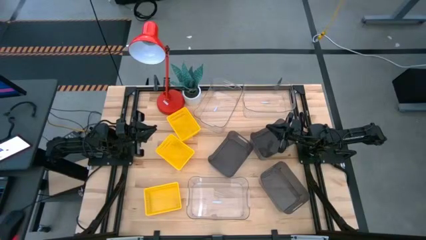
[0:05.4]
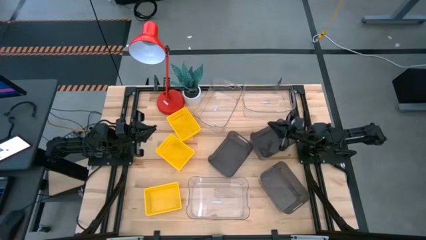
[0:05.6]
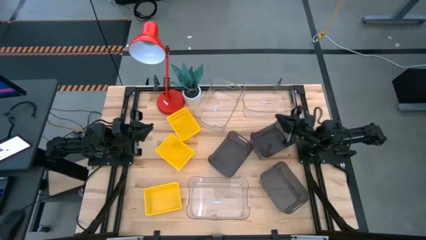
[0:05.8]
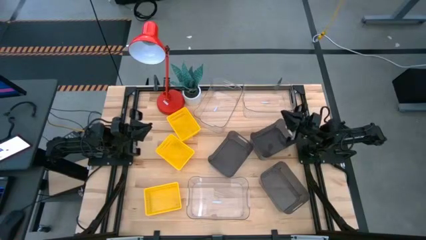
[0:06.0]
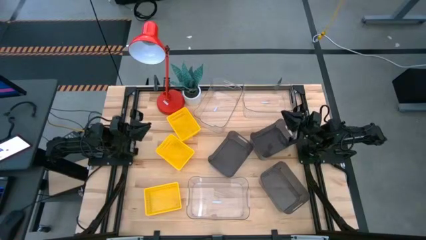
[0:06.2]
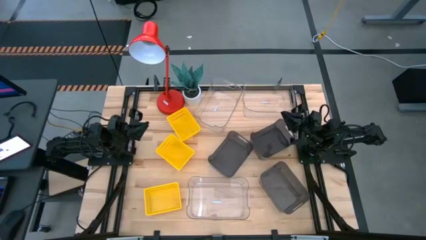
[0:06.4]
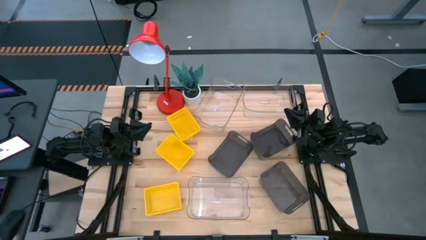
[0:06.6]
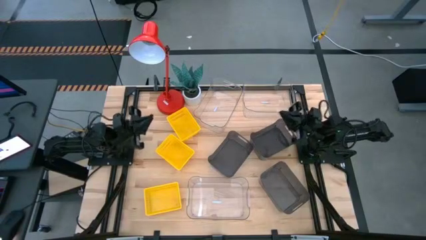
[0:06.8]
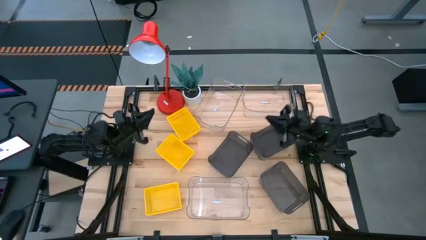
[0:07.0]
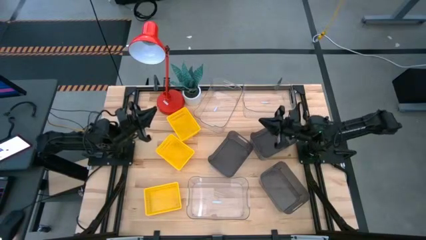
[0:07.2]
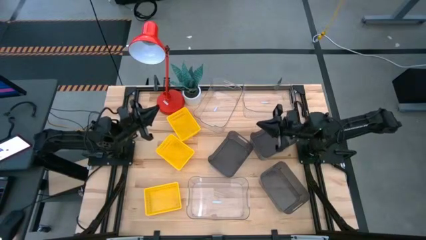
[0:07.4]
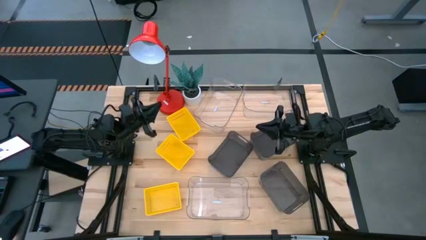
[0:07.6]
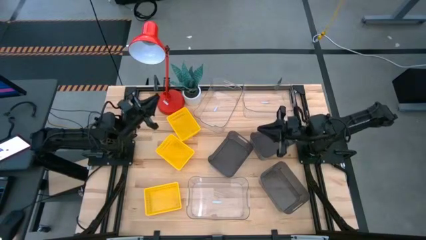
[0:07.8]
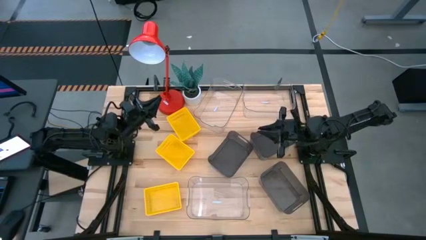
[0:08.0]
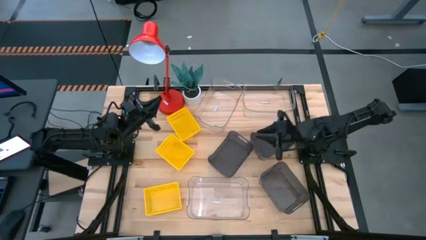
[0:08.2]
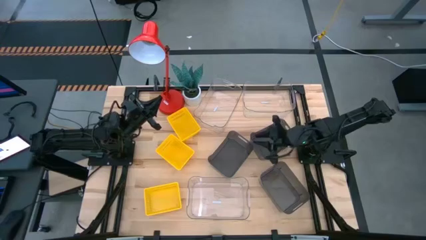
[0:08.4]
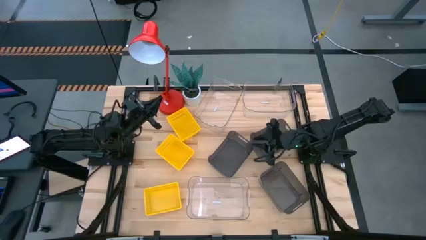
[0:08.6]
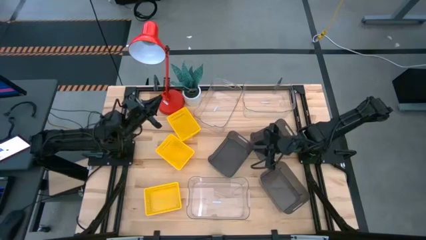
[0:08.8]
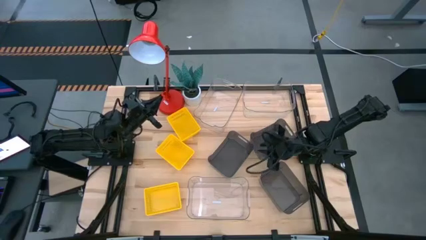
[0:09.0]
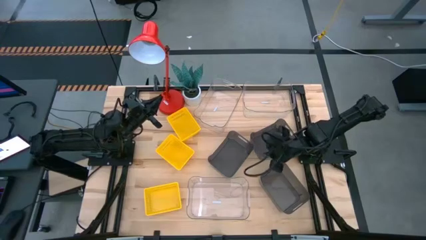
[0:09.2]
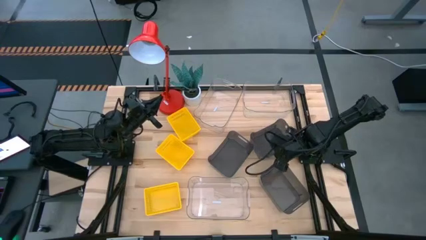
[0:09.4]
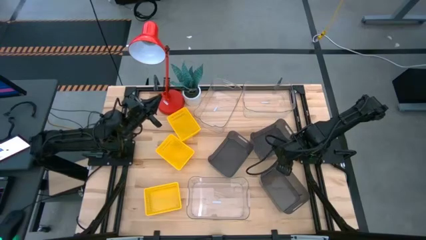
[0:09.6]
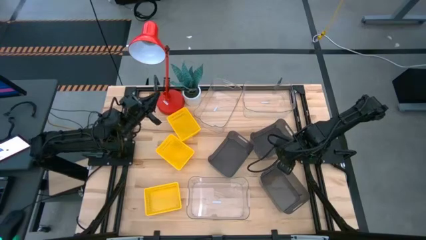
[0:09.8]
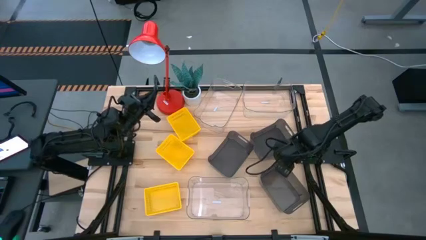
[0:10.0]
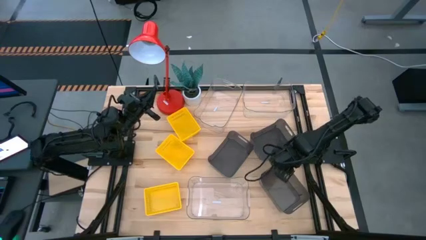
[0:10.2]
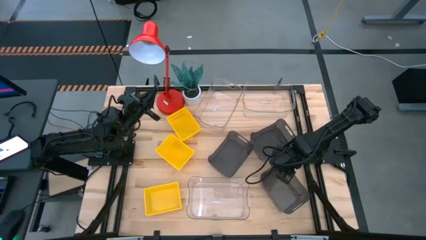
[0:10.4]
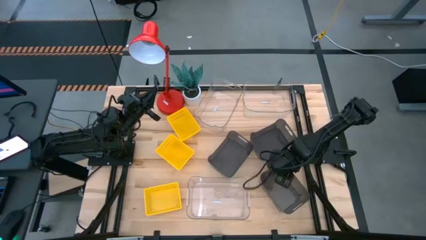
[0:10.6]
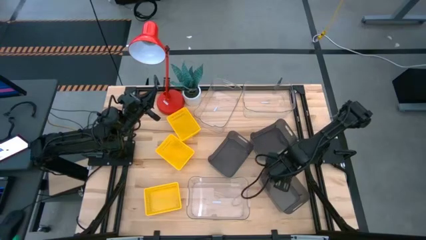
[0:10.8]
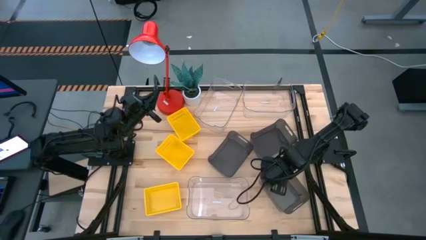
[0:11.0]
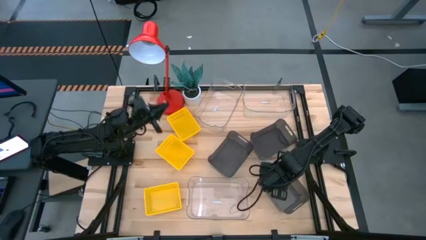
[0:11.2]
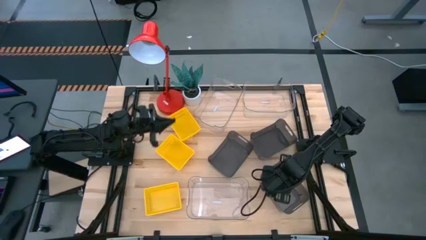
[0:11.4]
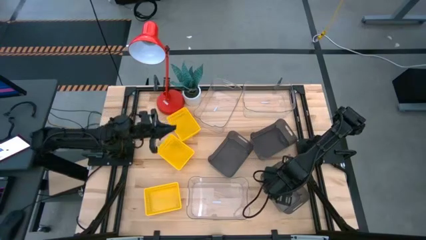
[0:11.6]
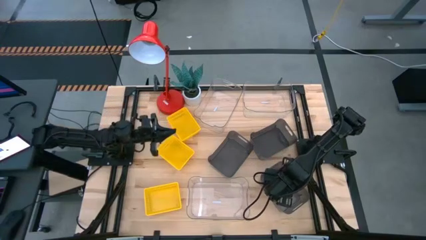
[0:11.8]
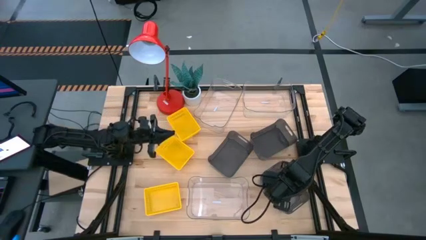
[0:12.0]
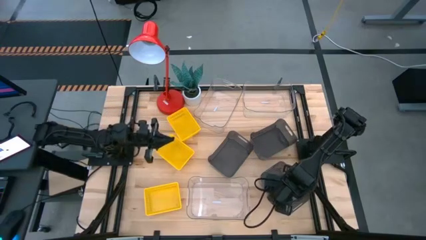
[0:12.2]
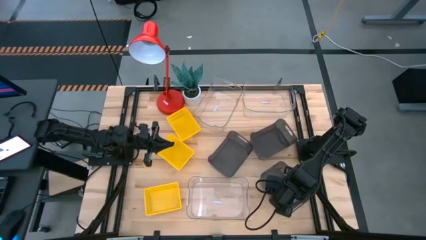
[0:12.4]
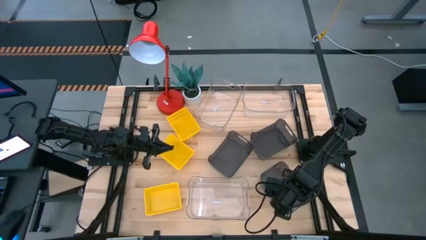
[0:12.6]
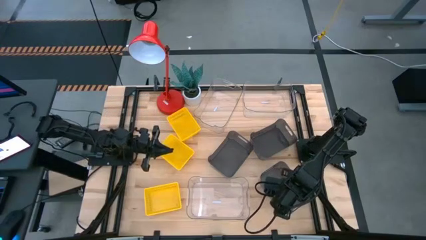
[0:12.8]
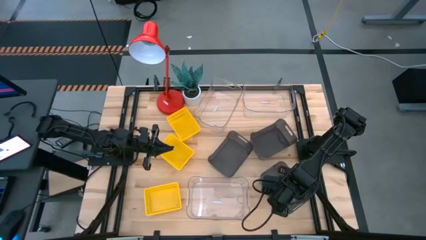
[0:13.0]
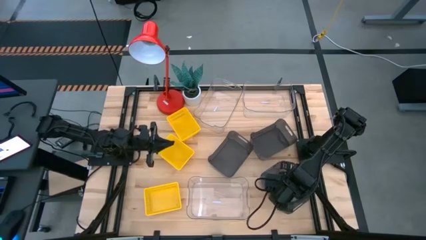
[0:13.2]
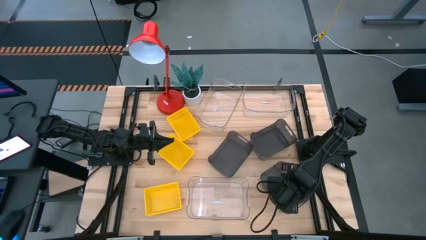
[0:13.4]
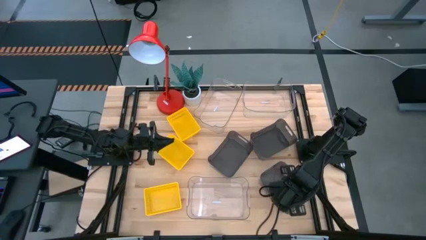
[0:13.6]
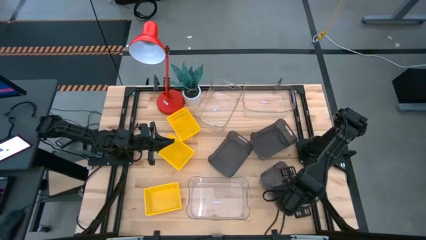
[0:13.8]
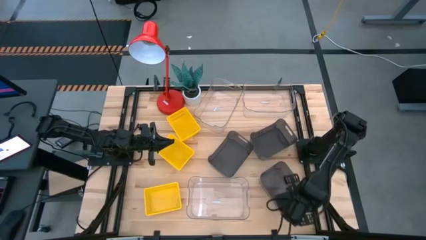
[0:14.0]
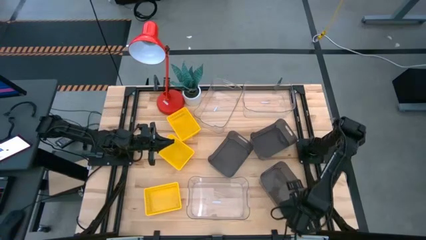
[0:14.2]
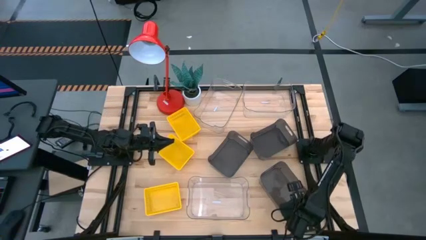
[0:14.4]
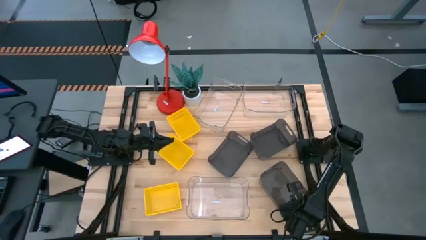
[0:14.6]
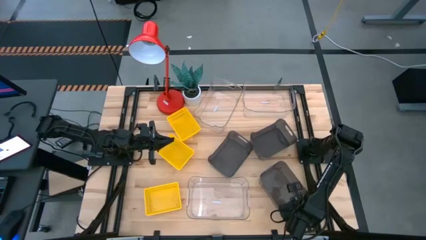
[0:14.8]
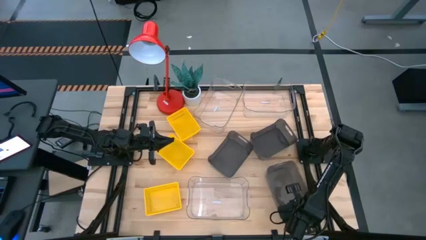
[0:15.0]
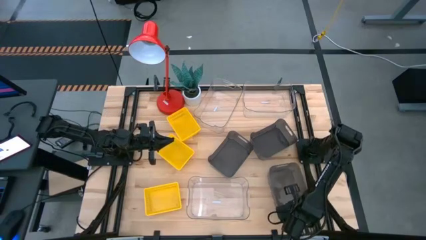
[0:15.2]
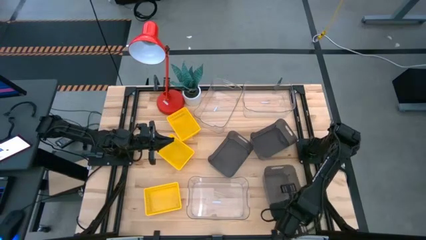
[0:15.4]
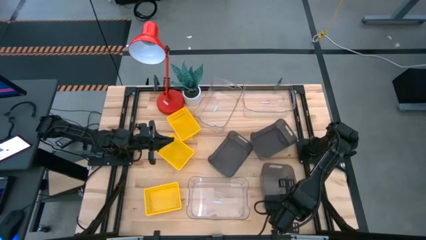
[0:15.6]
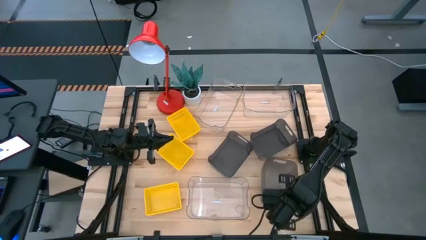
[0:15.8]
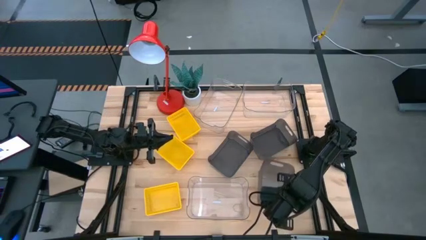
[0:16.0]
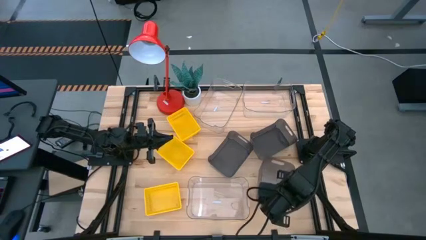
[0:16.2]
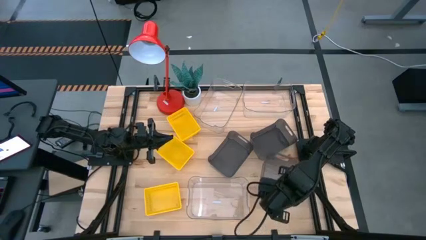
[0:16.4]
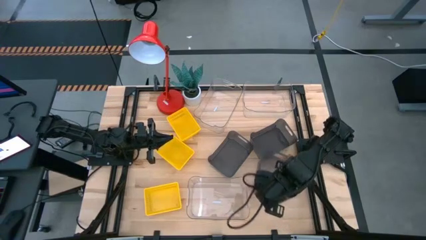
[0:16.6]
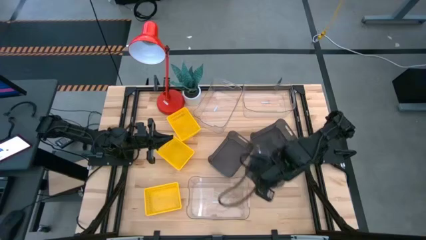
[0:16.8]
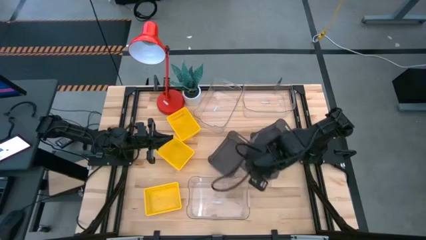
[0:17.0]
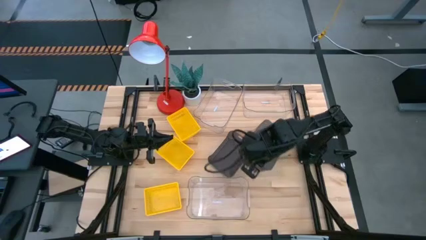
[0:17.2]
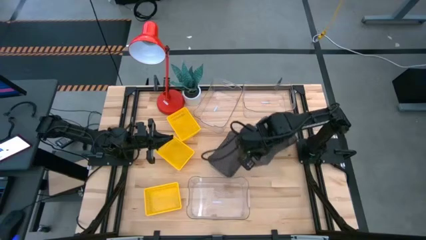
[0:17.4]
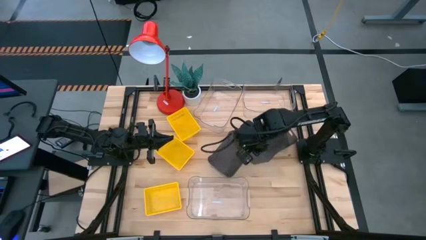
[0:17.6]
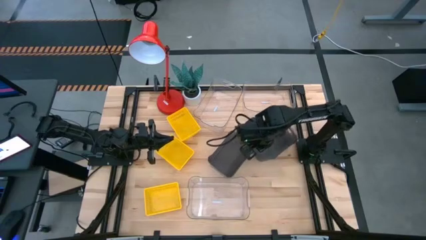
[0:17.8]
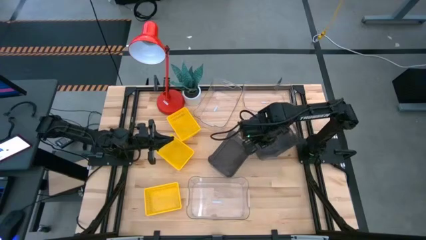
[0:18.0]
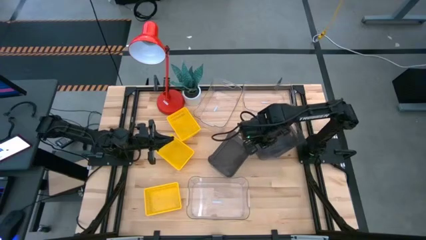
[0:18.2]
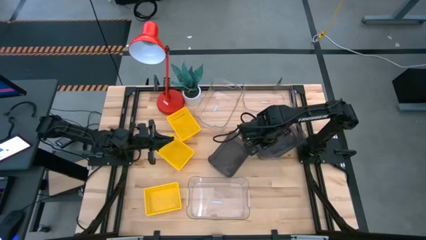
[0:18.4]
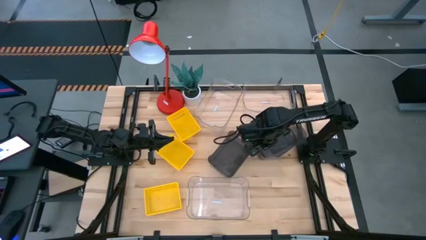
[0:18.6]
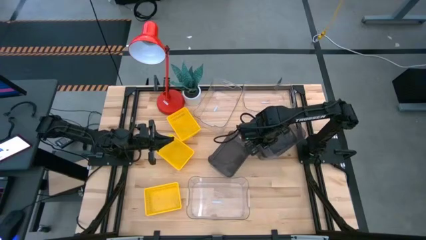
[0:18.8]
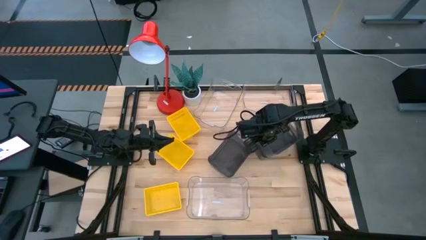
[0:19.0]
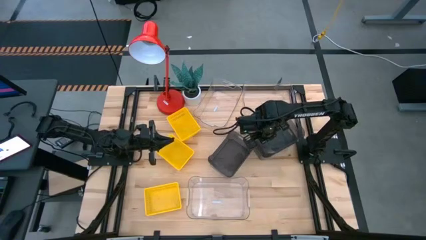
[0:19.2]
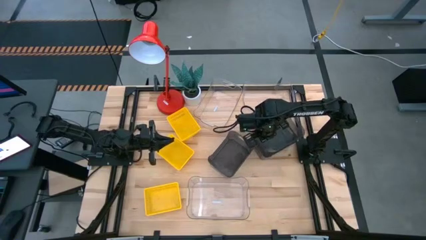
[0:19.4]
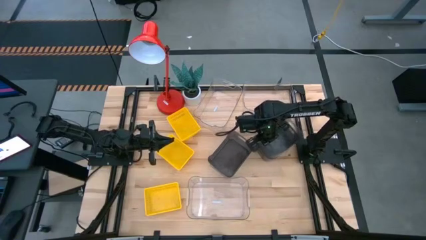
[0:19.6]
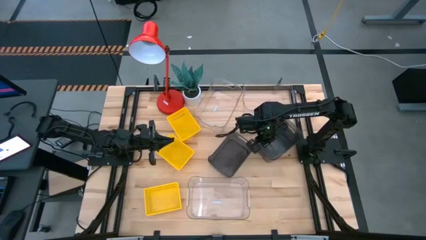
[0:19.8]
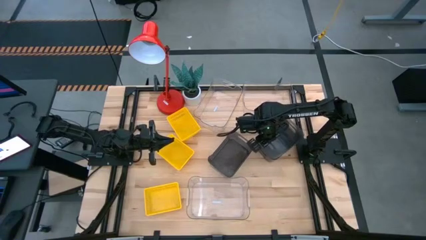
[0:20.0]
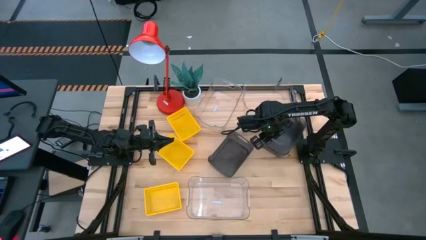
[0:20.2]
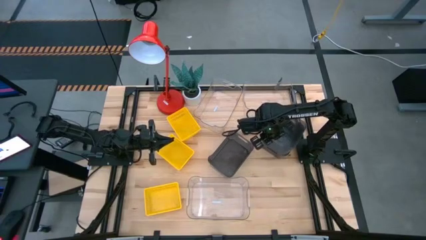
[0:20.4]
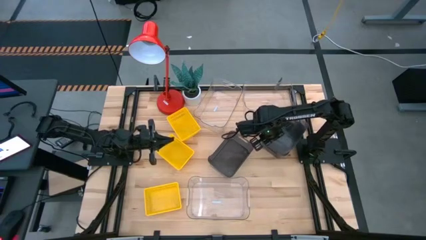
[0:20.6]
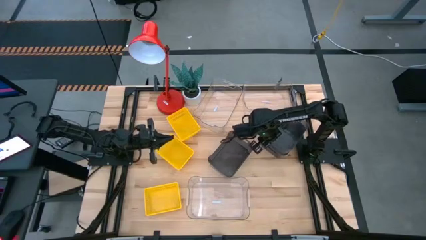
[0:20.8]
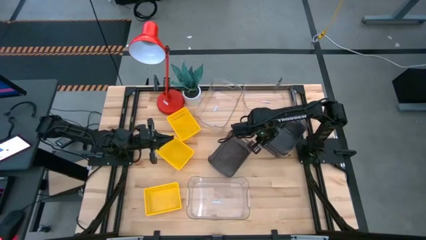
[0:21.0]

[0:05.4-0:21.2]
Stack the bottom black bin on the top right black bin
